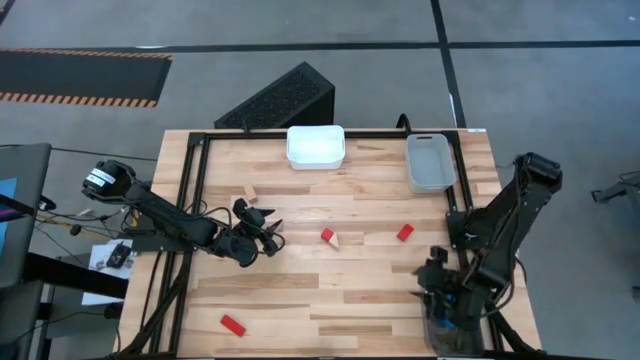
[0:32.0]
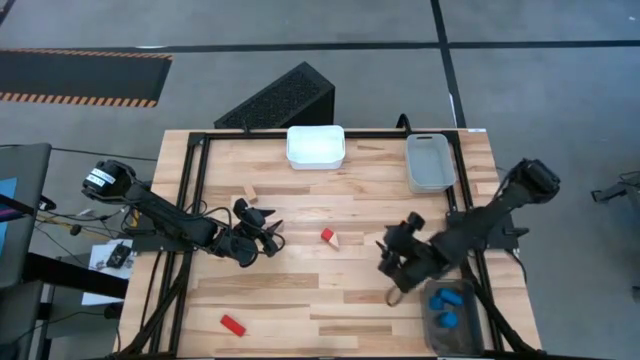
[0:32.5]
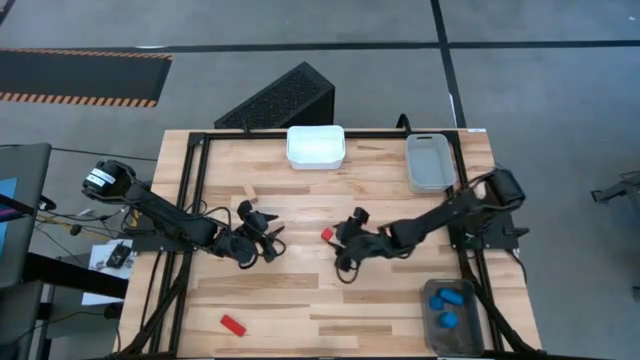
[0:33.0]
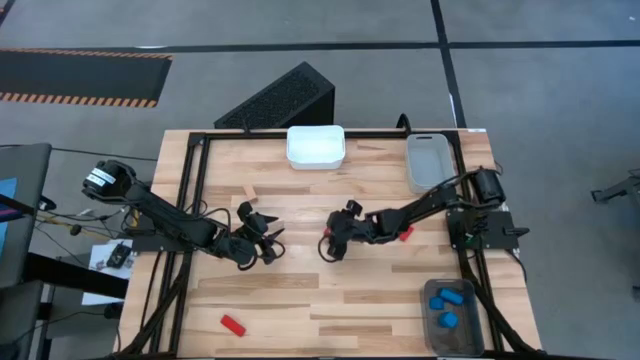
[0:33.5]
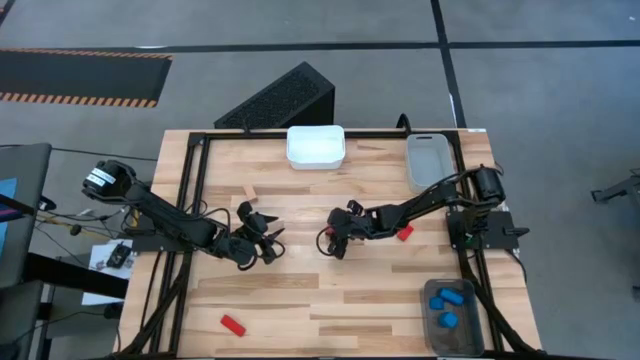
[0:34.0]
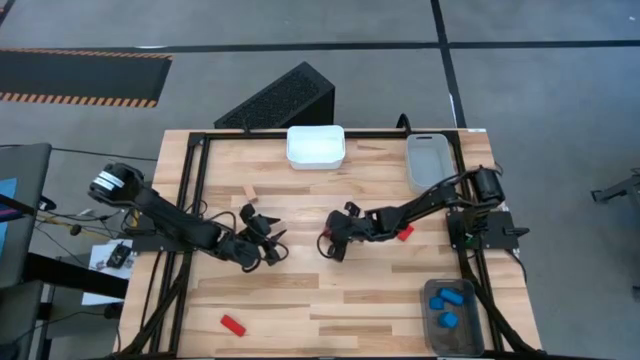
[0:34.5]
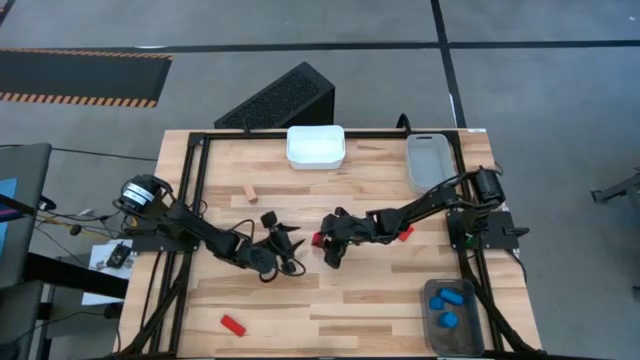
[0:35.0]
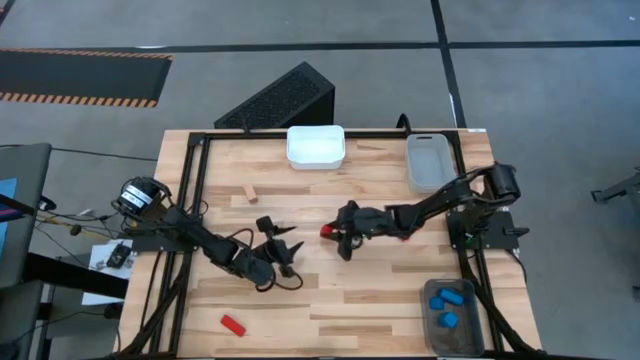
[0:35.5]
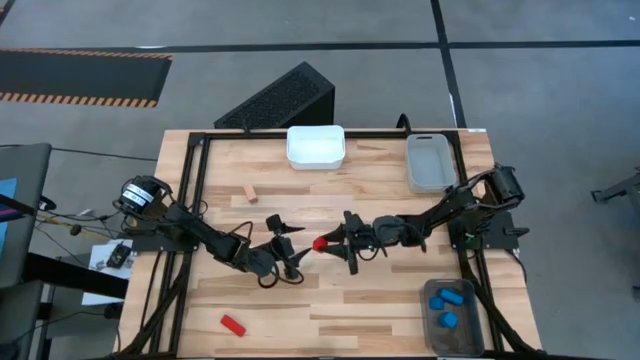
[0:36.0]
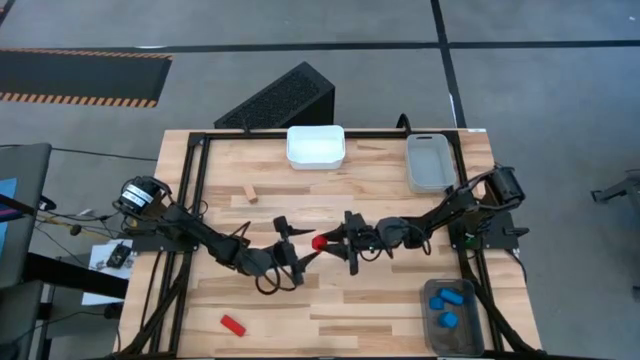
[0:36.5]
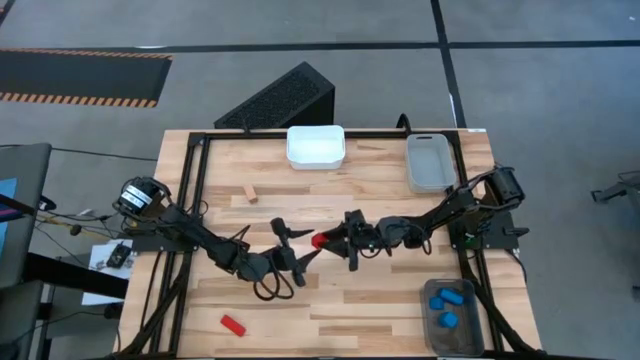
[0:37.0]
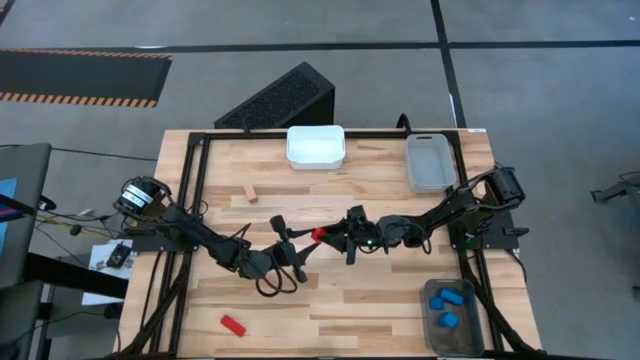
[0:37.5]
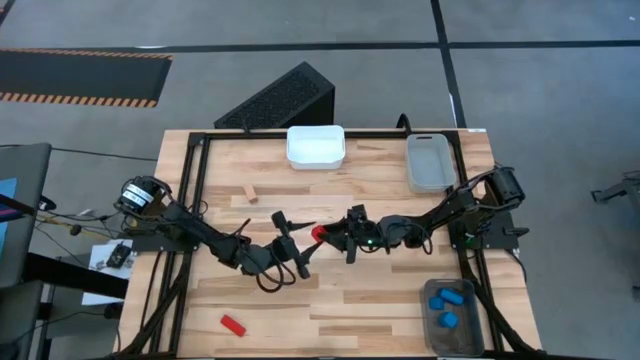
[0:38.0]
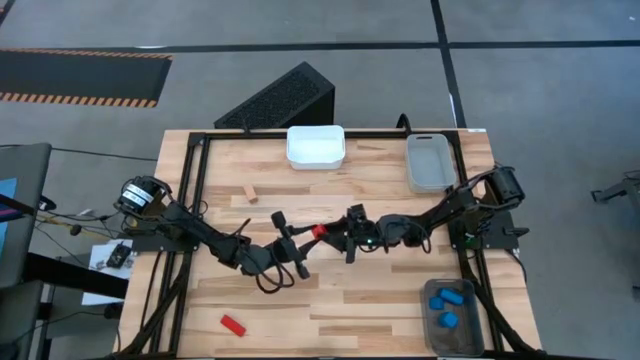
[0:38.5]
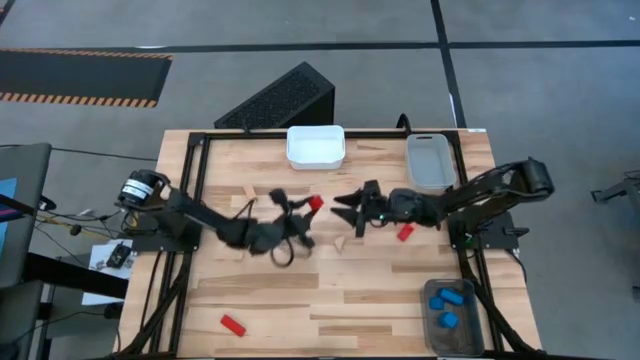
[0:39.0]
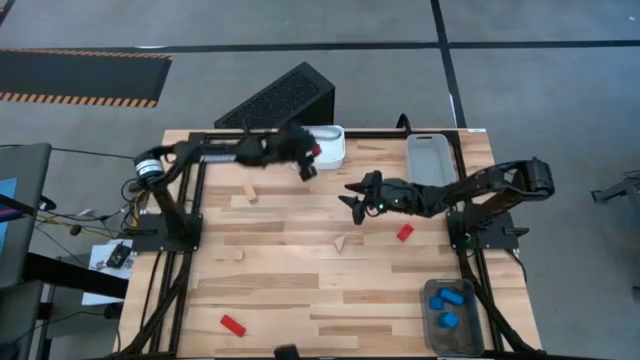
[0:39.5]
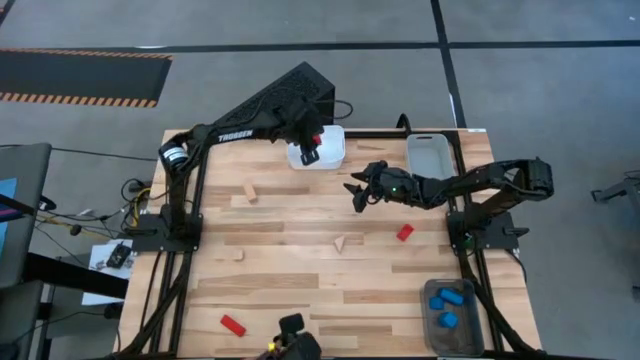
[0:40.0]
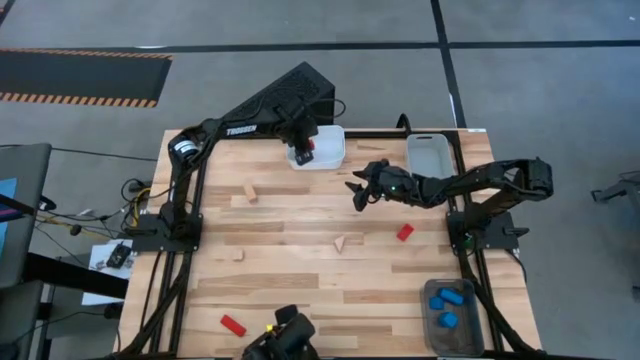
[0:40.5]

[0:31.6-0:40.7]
Task: Sort & place blocks by color
Put the top left red block into the white bin

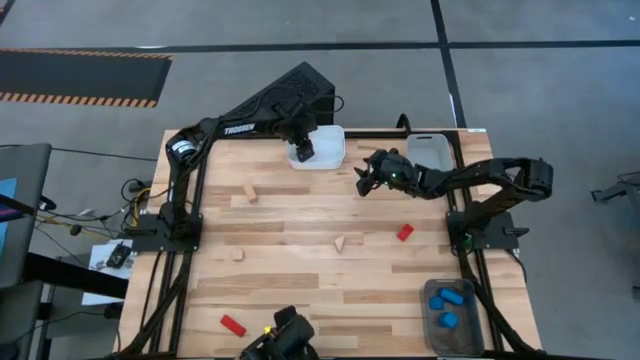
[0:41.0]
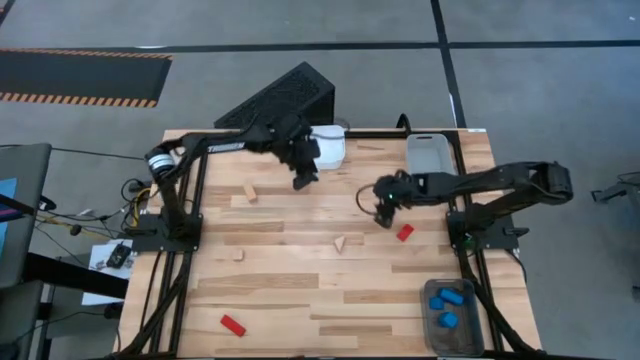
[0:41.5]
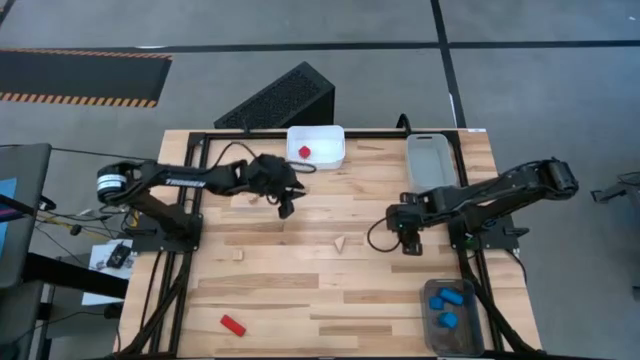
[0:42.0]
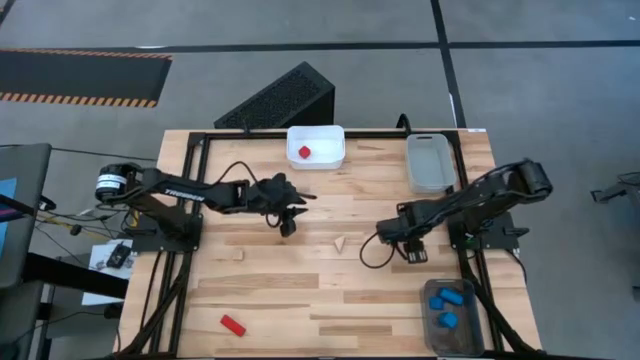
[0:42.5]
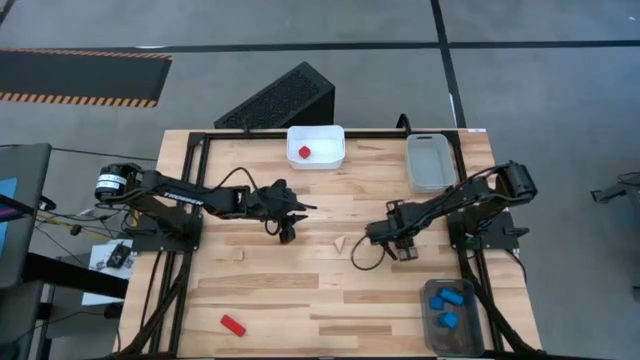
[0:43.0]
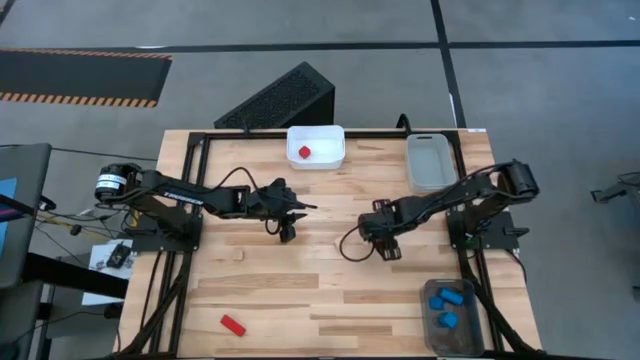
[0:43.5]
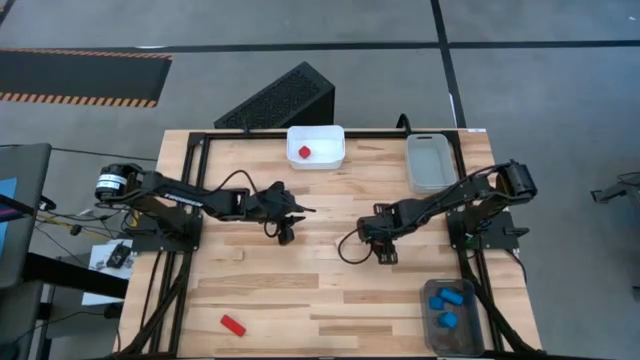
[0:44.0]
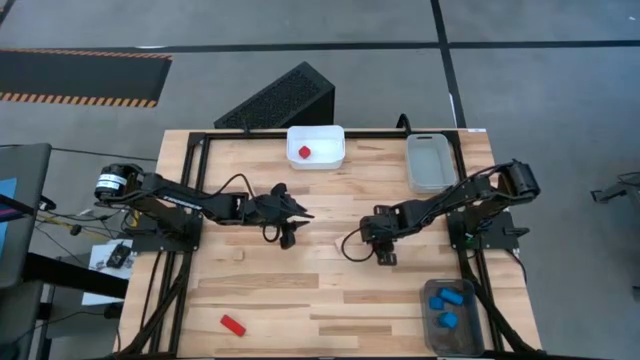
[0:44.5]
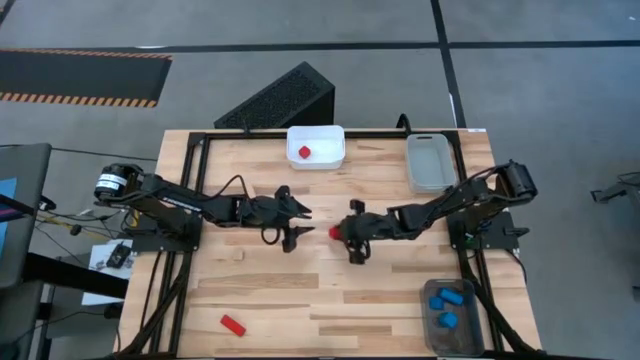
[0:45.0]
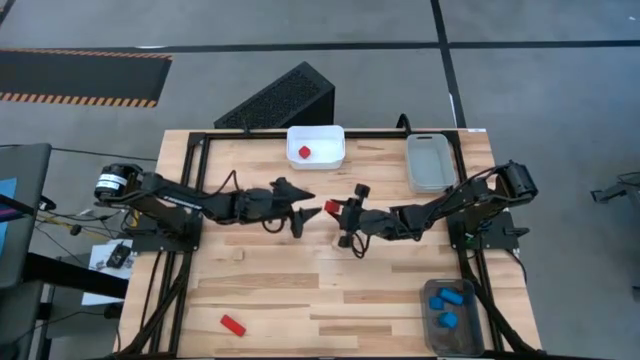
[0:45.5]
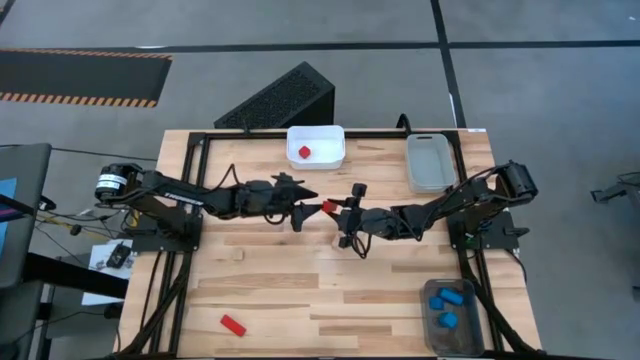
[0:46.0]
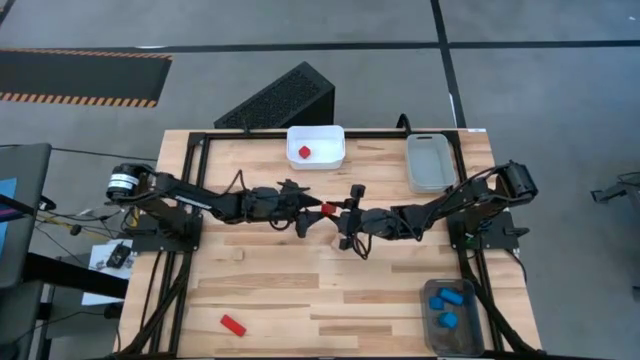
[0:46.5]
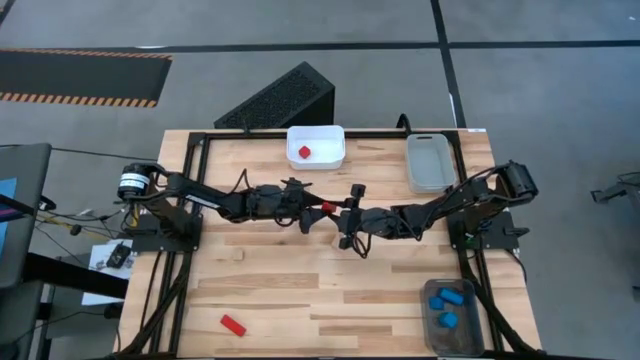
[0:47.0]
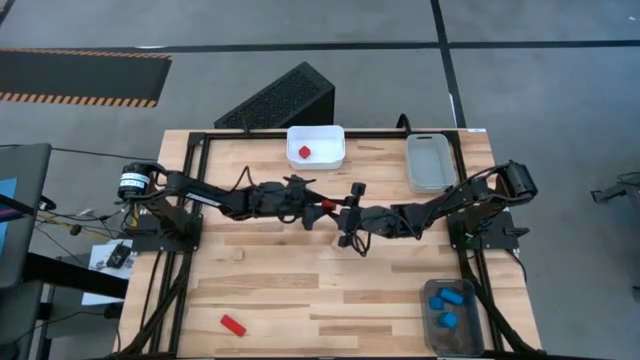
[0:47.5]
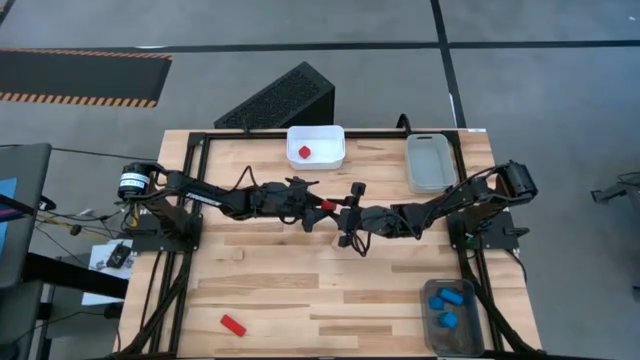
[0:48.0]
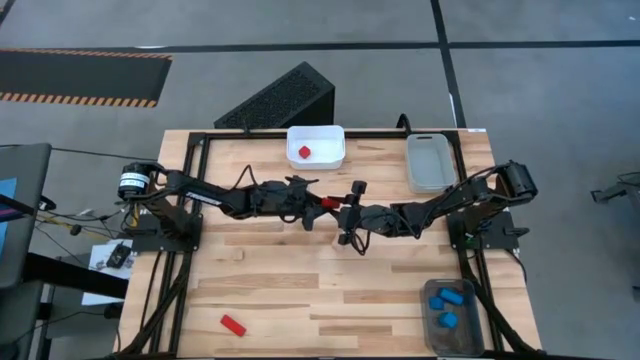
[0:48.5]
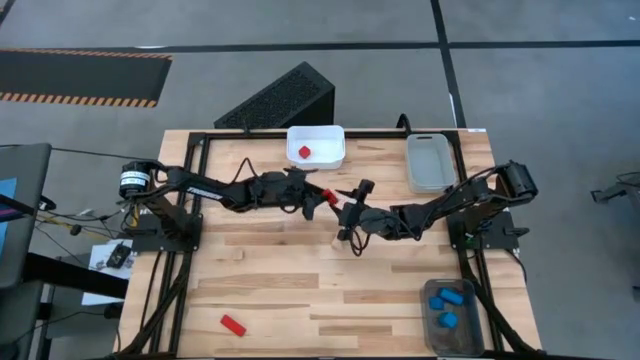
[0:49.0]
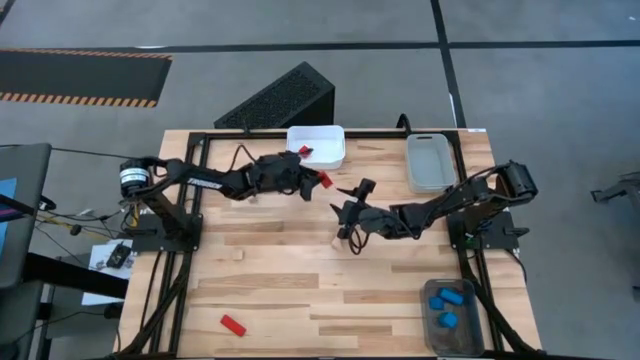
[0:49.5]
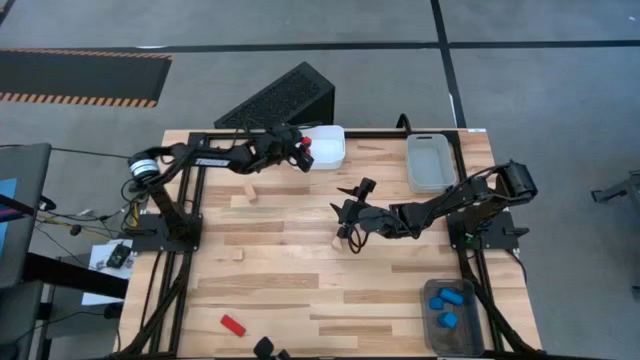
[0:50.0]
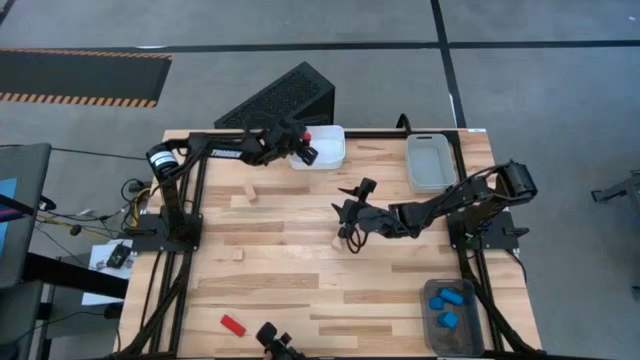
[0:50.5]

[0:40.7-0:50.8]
Put the top red block into the white bin

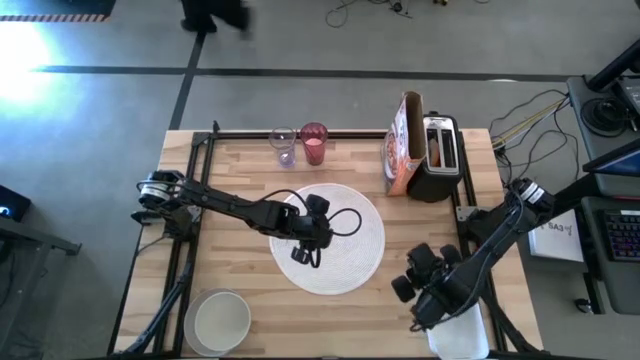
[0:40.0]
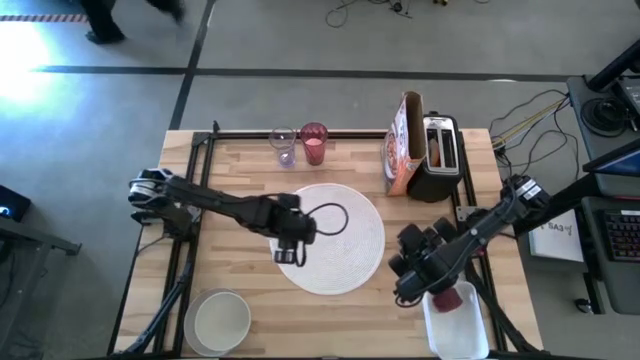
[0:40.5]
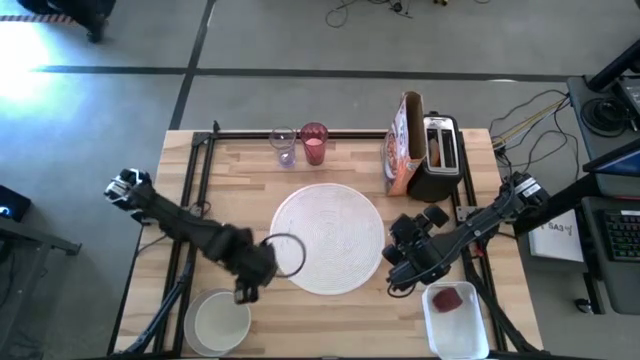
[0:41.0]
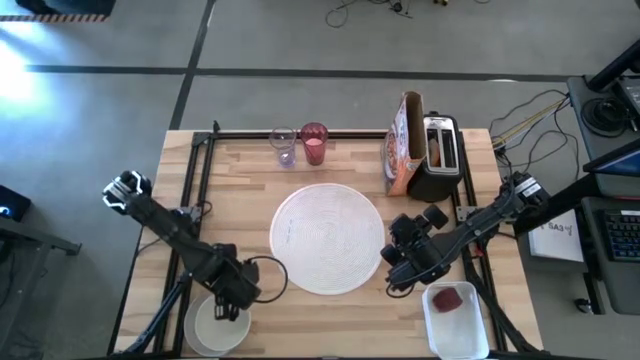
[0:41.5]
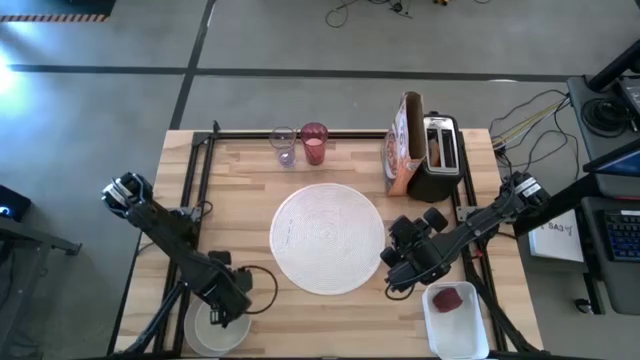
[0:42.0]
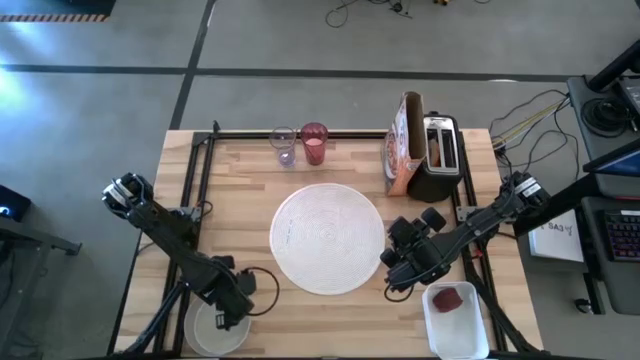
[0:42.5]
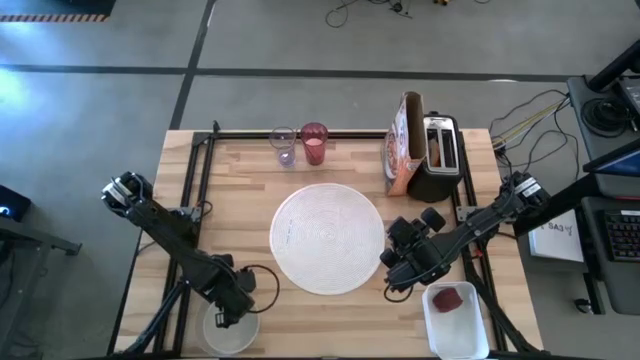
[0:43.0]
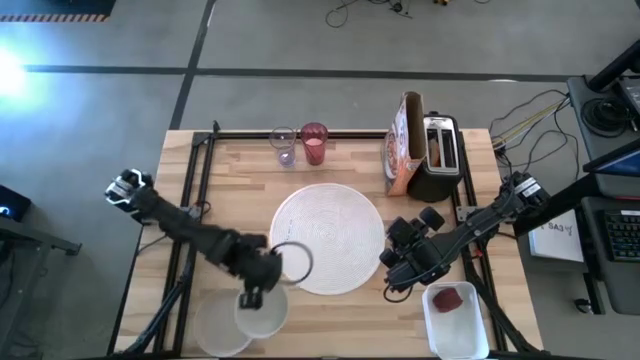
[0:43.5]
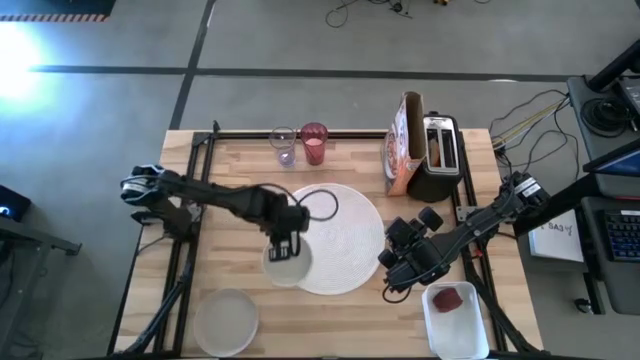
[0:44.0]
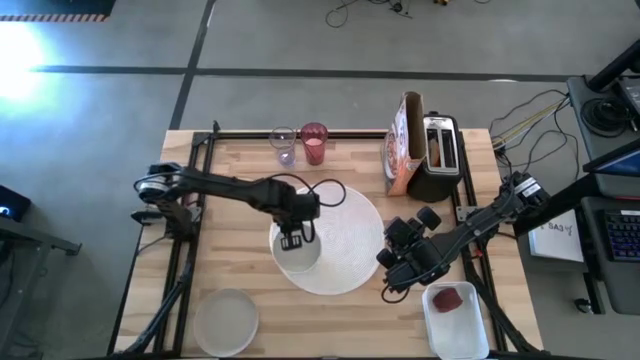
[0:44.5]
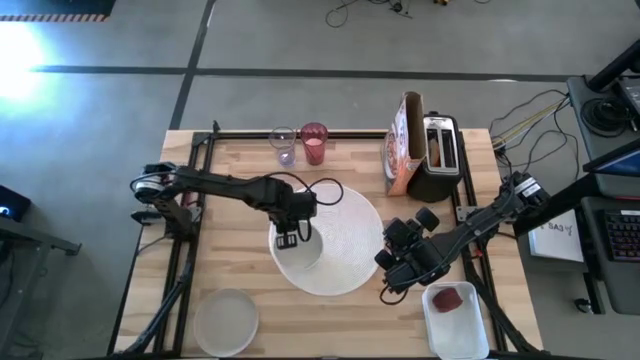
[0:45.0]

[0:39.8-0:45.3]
Task: Arrange a breakfast setting
Put the white bowl left side on the table mat
